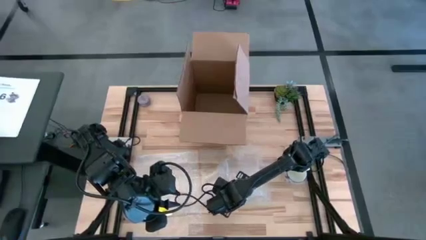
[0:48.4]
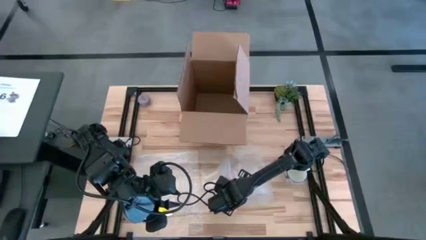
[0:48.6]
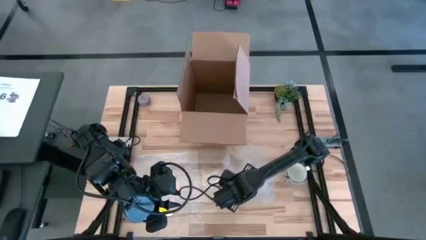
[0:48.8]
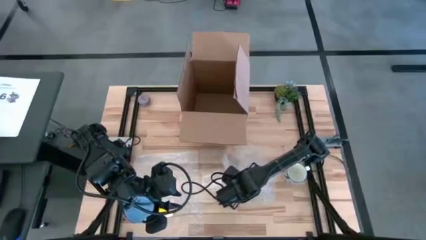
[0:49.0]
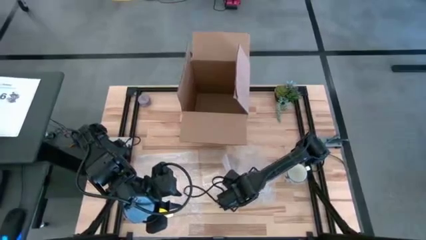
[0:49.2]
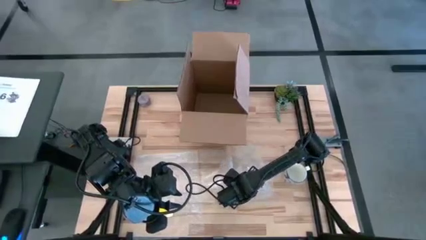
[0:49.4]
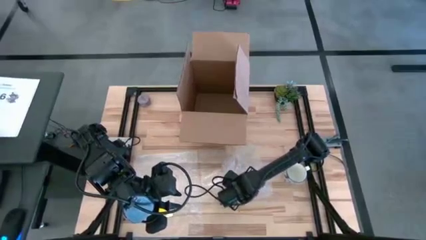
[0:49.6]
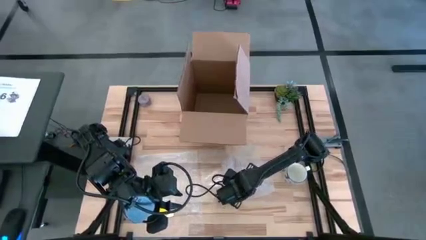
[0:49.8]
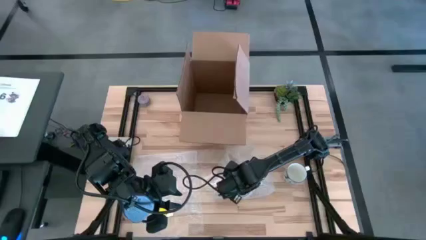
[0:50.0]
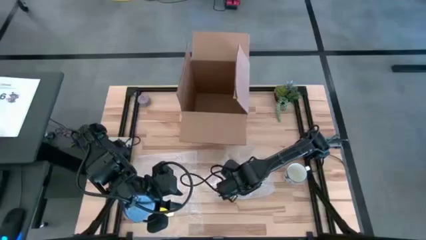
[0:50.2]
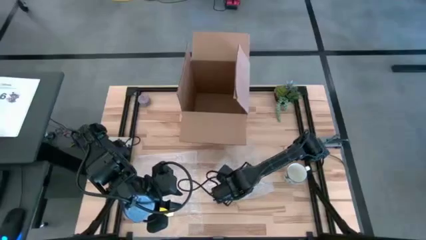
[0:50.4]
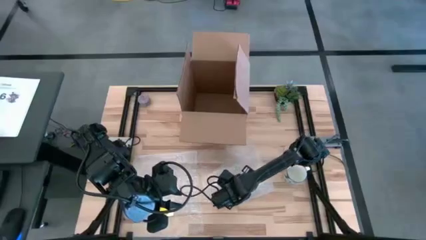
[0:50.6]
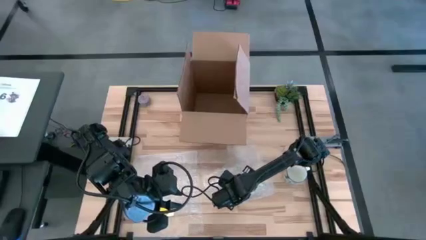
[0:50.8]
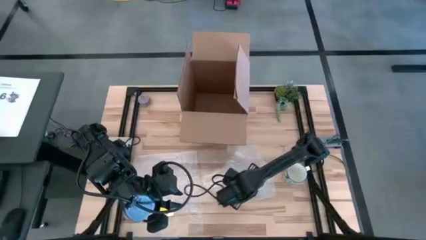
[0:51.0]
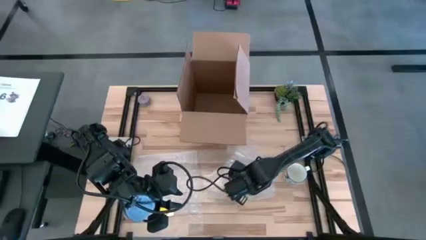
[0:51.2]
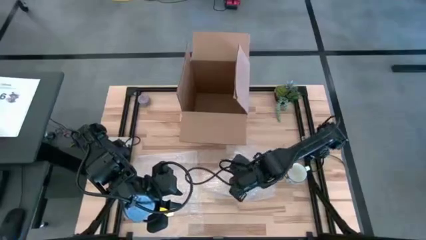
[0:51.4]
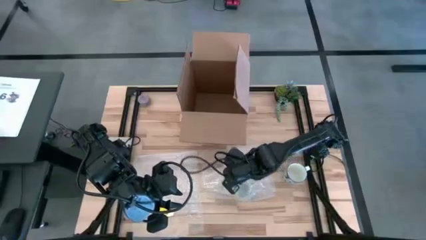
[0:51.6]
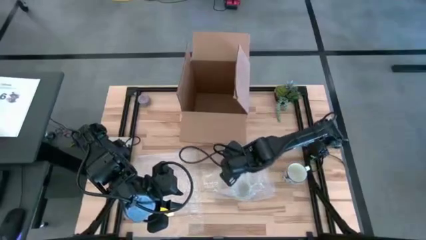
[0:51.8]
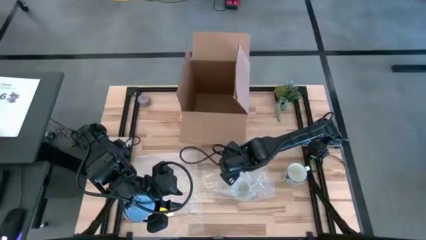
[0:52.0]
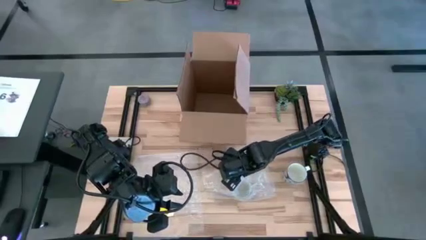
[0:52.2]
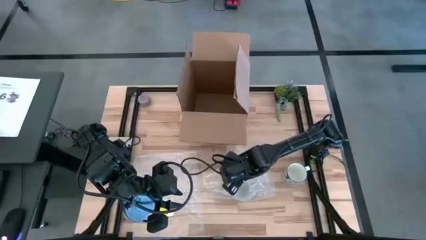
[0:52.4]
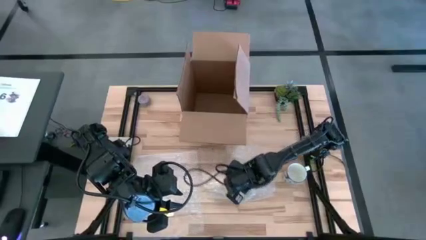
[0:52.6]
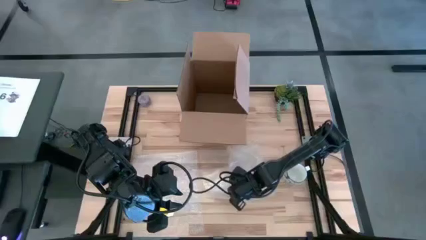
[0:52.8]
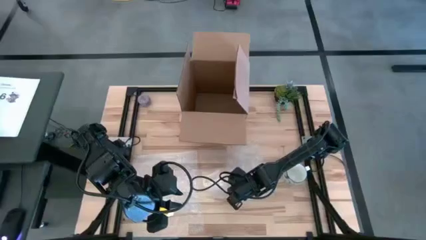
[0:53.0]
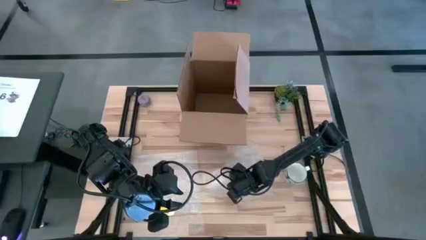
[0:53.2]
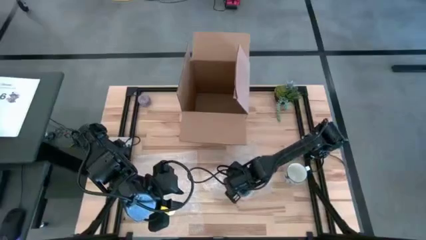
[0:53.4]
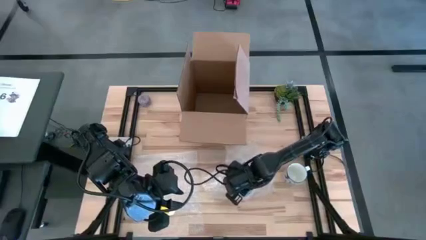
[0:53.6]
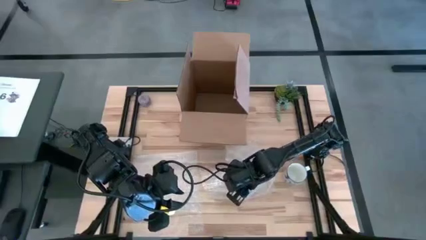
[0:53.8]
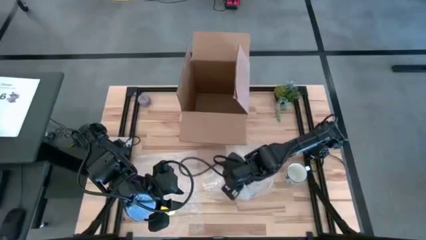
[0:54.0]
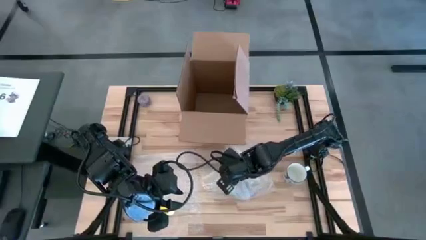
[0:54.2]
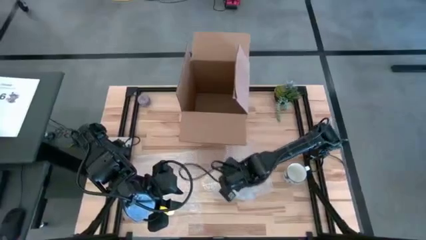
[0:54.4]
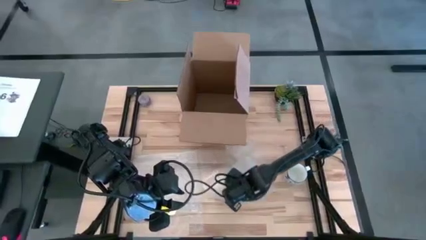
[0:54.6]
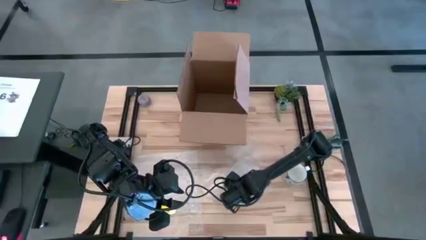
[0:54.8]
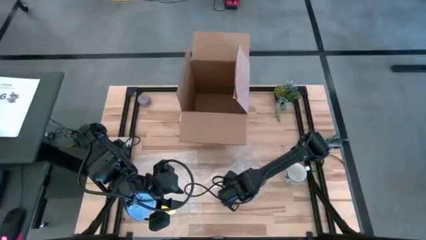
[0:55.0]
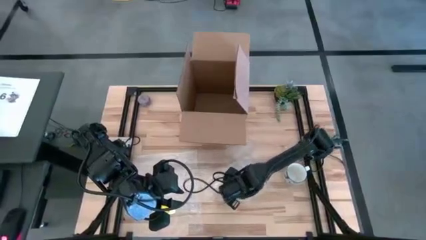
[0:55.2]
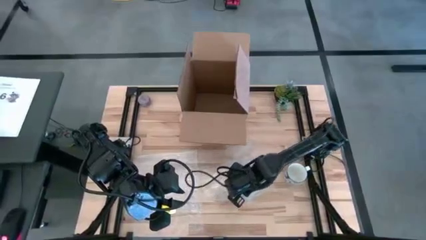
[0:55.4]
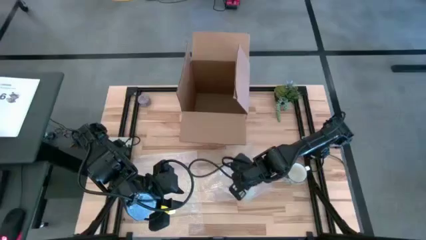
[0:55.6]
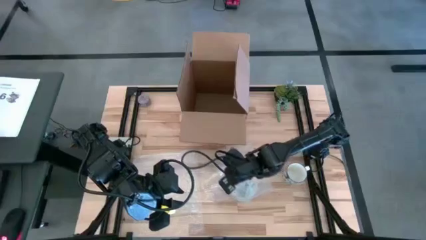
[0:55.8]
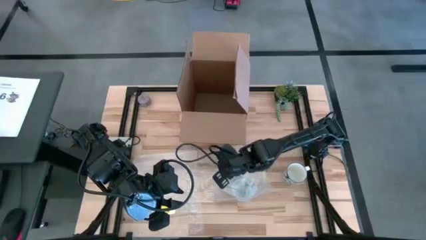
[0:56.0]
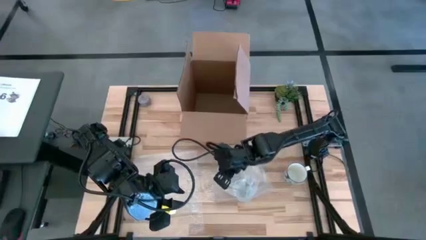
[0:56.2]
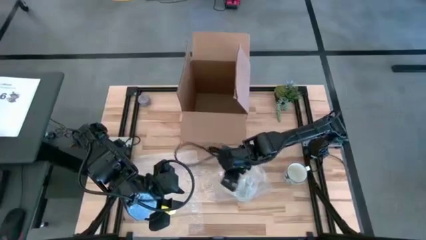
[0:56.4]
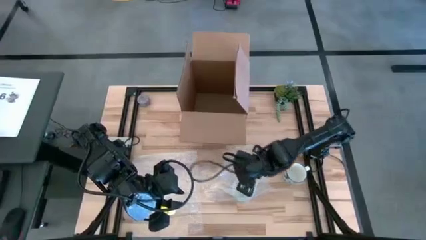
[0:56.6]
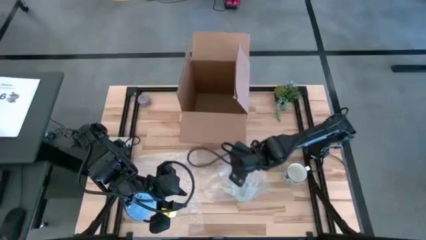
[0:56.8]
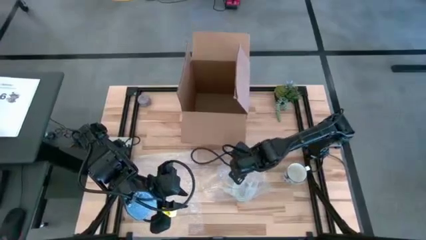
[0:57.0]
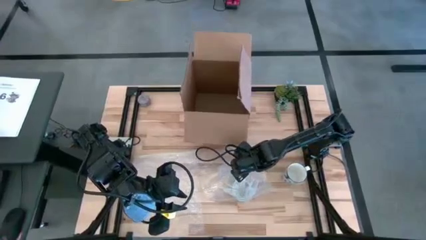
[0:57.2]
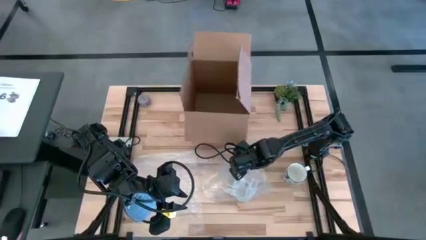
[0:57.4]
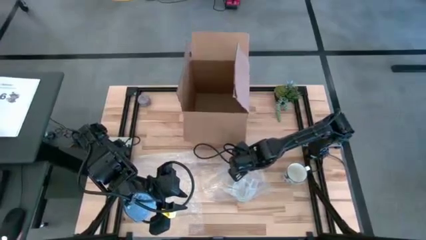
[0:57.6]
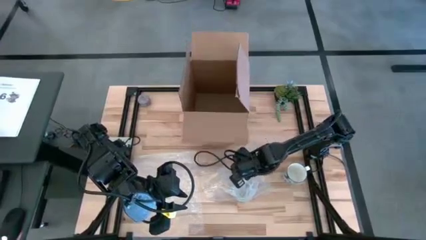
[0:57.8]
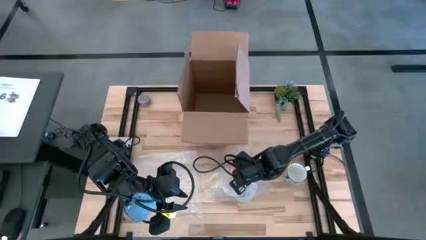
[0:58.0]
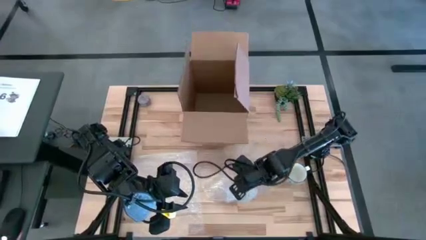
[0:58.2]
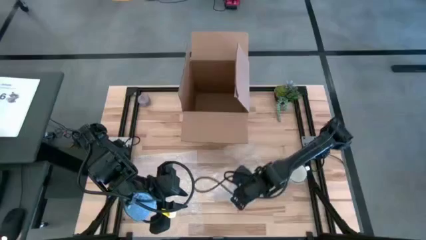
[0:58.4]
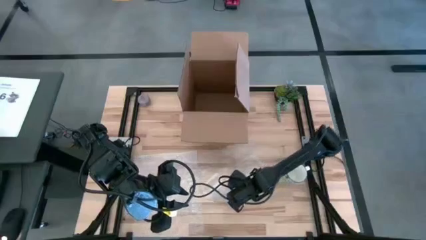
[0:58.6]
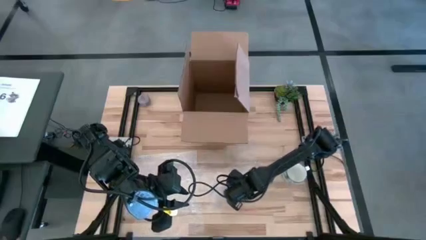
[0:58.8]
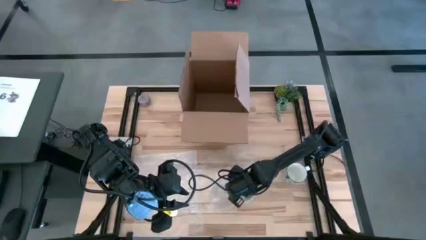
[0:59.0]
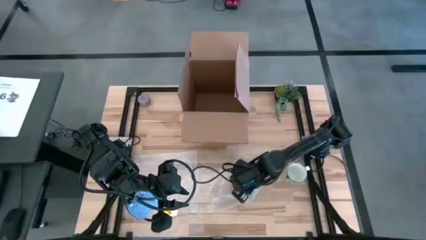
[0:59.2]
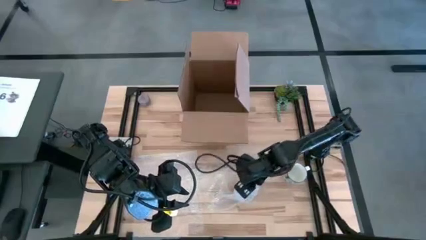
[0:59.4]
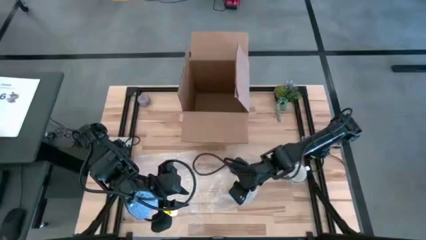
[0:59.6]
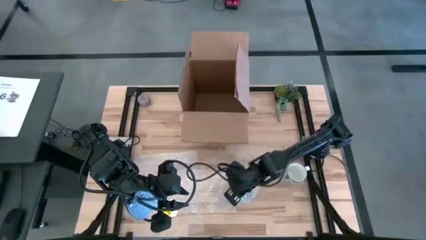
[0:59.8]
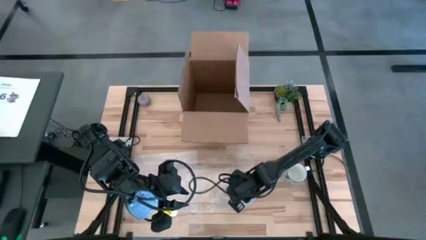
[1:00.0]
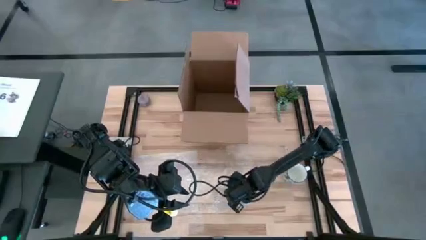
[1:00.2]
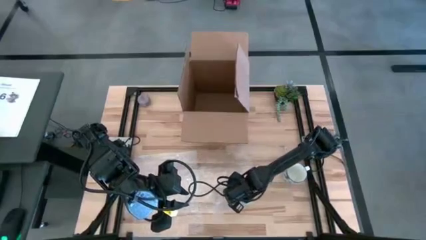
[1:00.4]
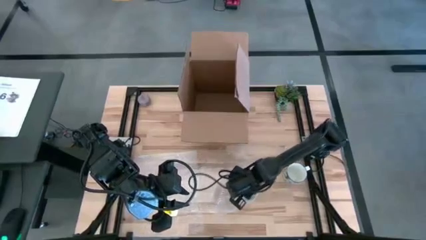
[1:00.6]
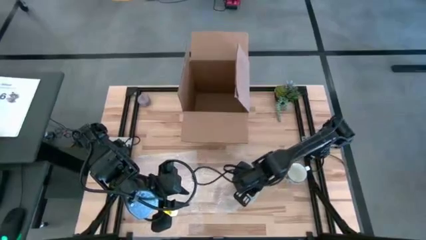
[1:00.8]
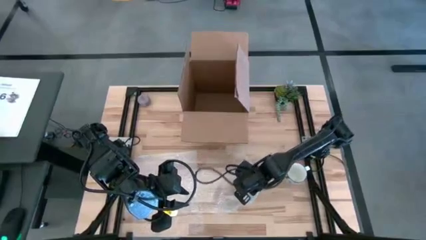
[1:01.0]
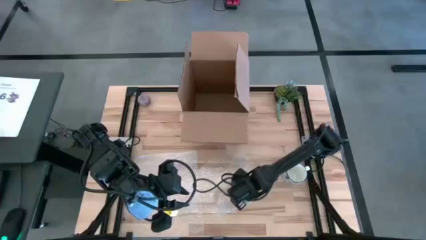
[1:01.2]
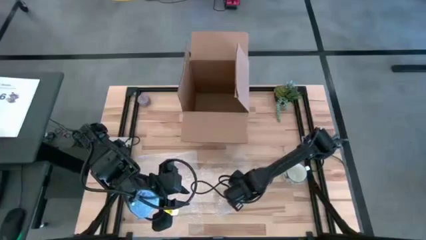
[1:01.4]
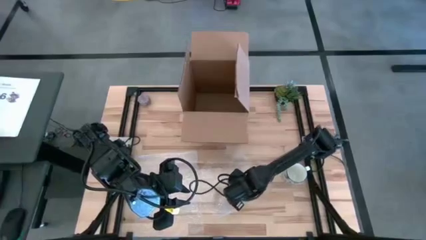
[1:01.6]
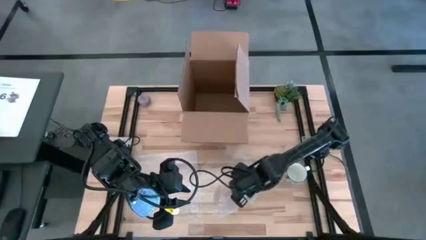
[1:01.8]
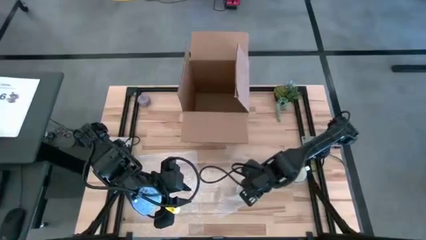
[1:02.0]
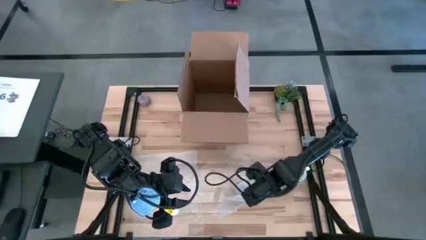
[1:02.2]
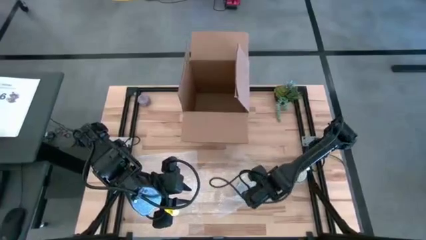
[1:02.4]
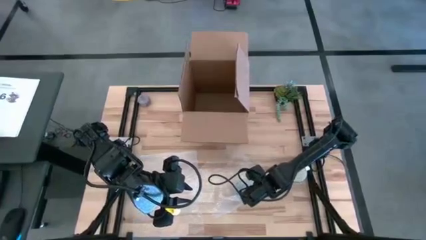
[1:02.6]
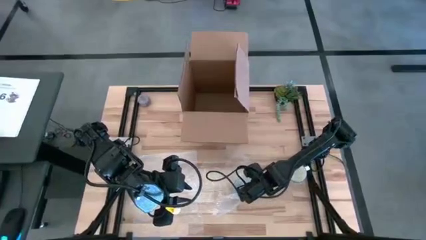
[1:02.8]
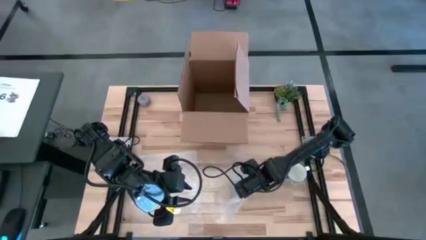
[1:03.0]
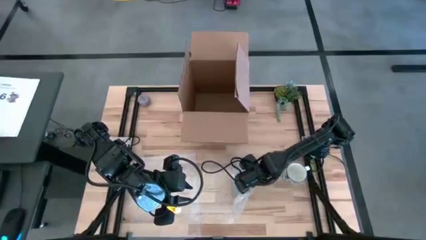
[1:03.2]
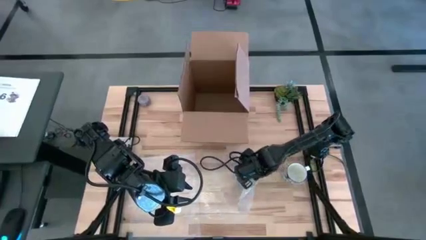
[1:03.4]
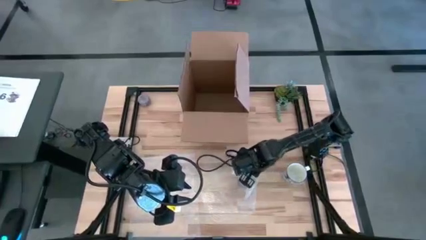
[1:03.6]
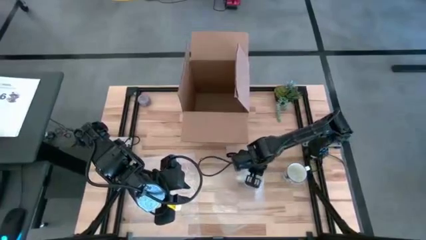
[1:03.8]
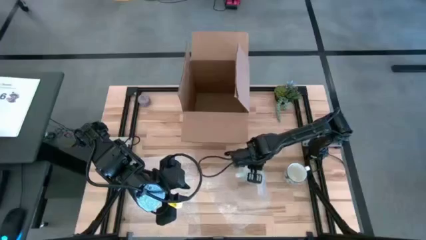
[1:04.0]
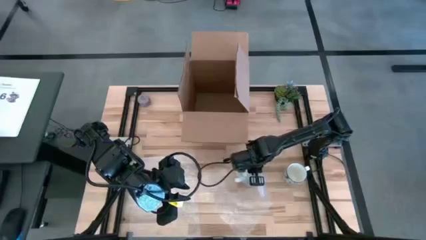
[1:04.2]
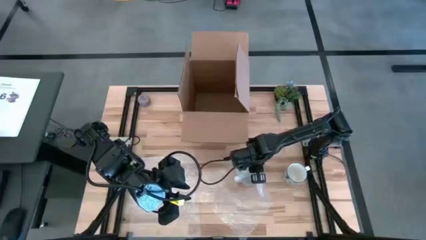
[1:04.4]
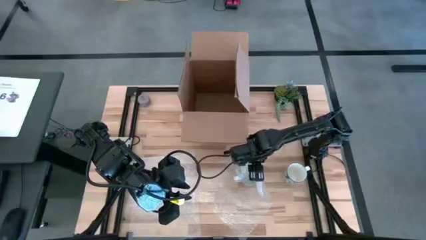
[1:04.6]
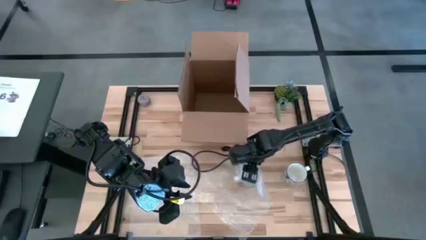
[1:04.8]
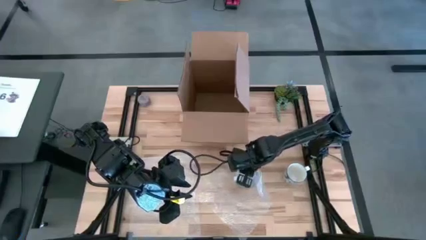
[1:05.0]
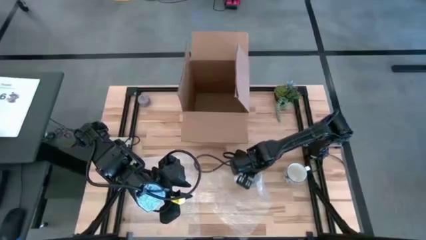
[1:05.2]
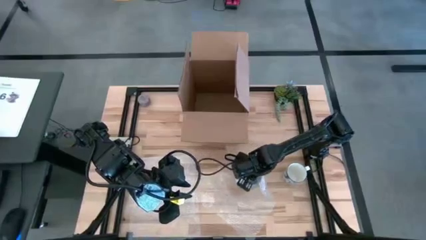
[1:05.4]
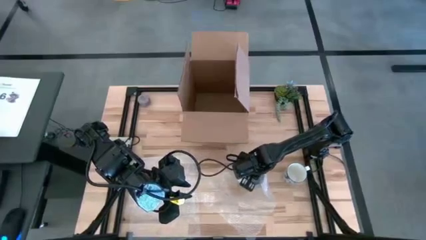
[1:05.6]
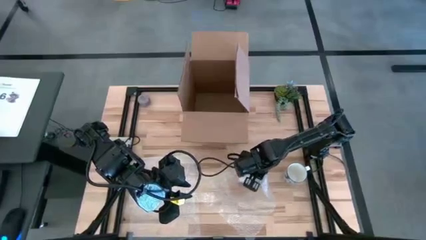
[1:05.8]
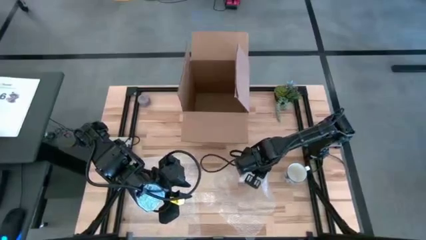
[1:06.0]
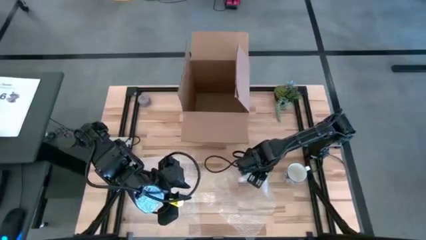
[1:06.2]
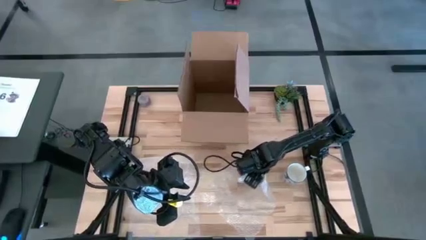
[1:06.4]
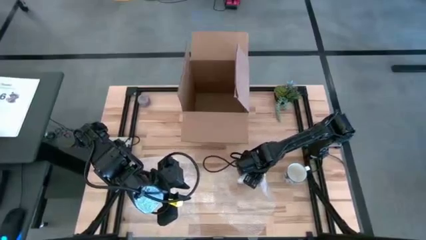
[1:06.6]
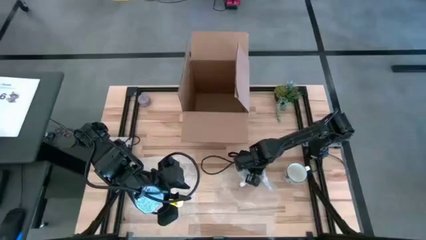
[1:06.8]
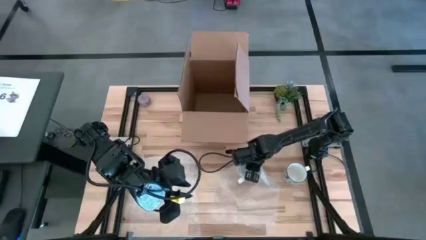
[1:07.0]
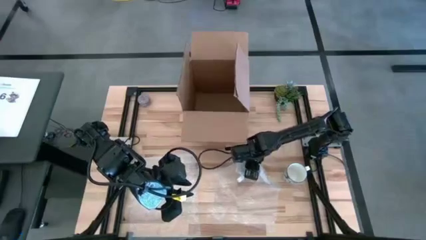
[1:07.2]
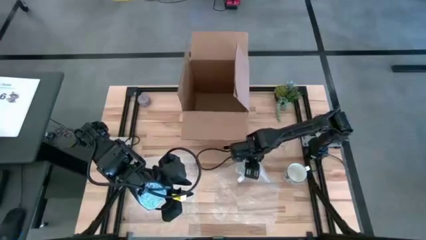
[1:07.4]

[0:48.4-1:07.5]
Task: wrap mug
Wrap the blue patterned mug with the right transparent bubble wrap
